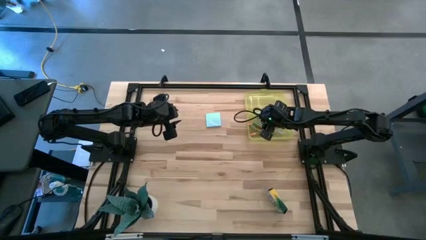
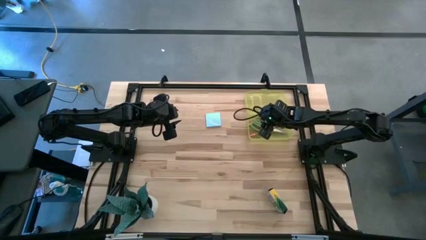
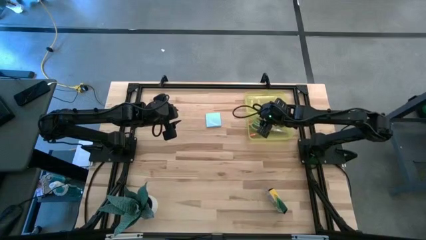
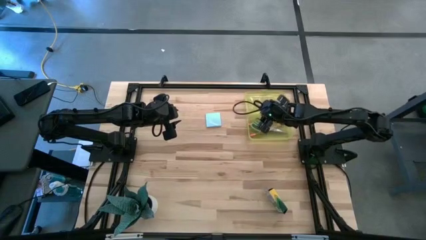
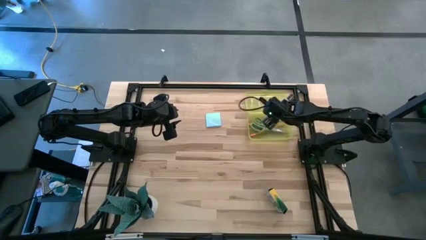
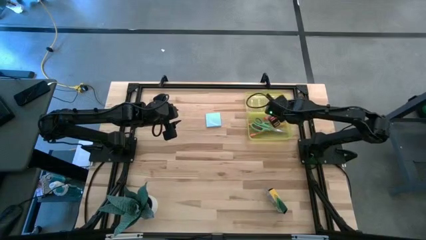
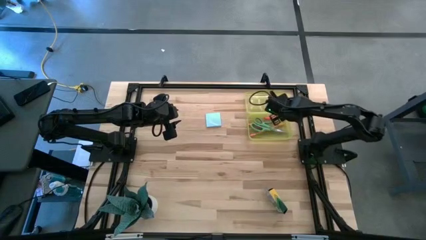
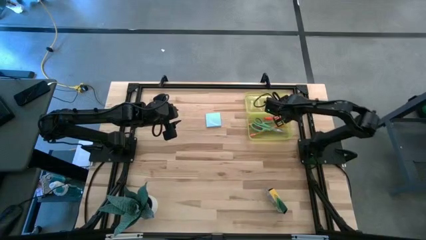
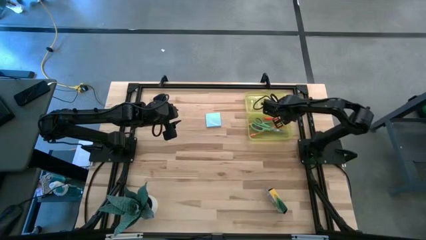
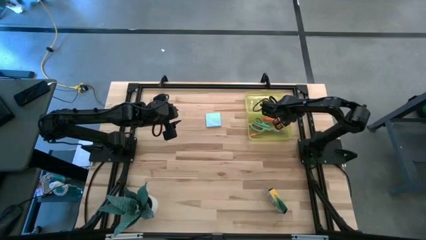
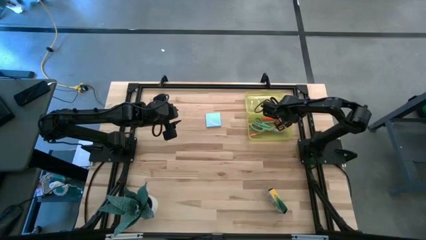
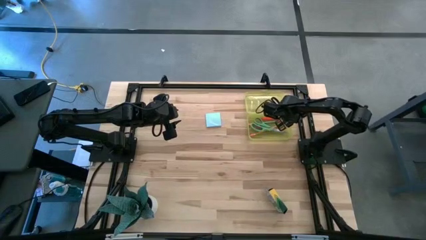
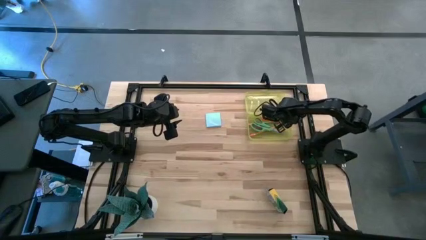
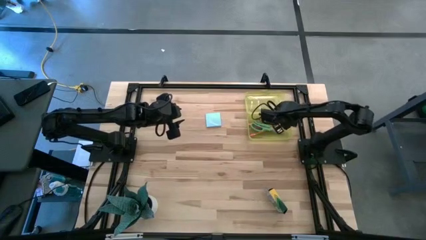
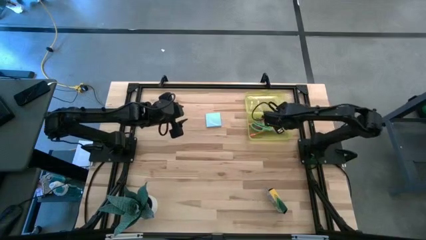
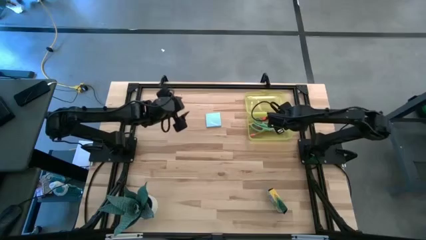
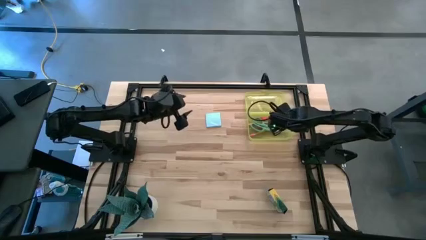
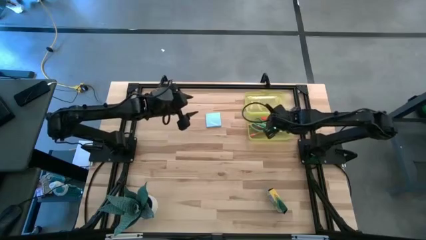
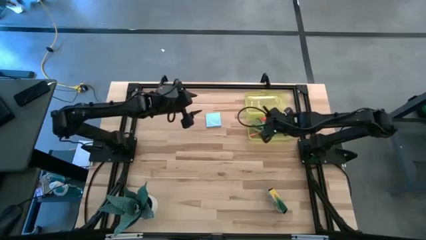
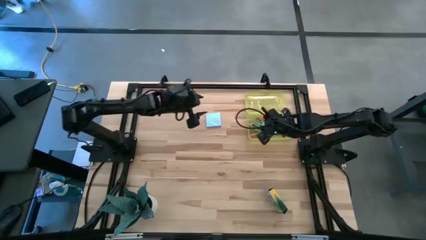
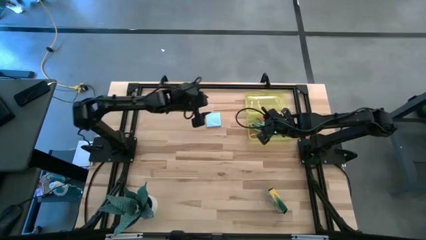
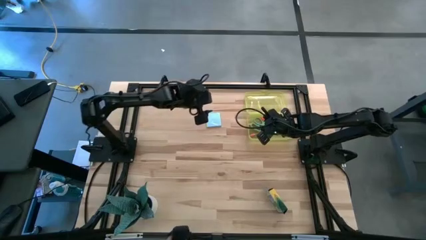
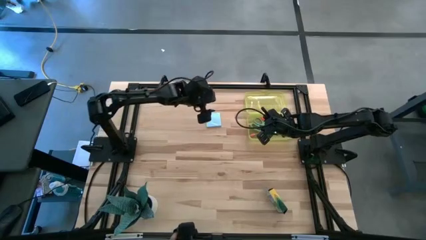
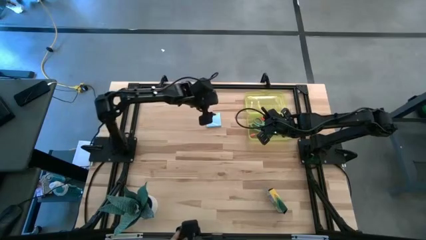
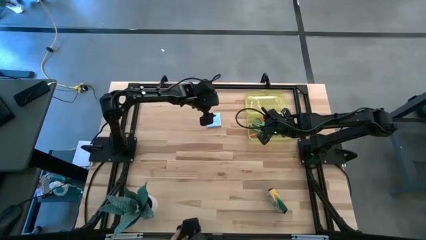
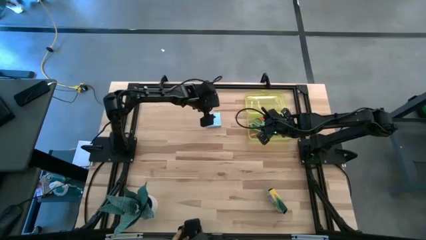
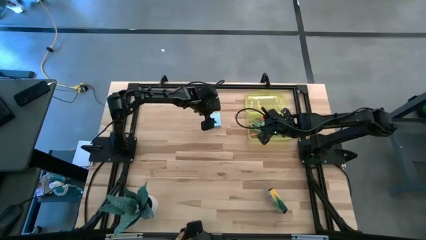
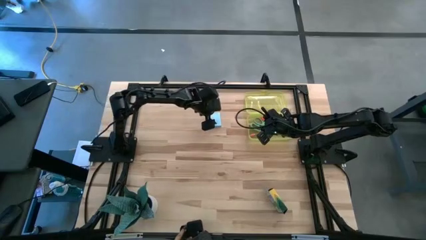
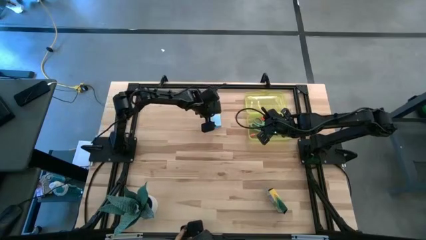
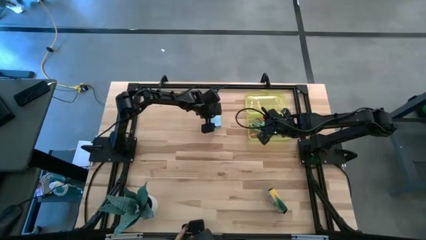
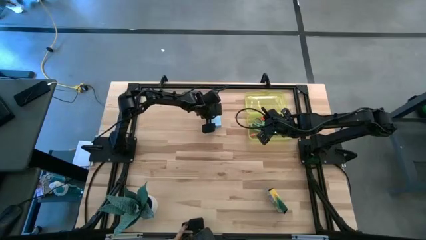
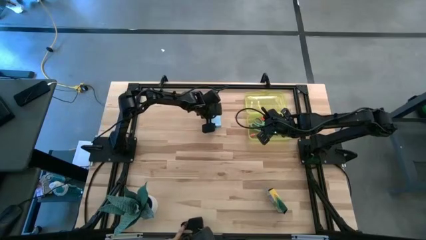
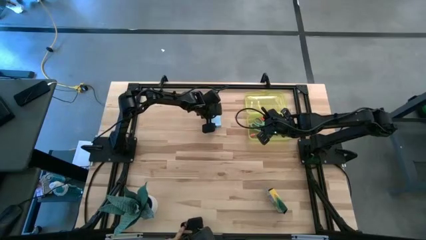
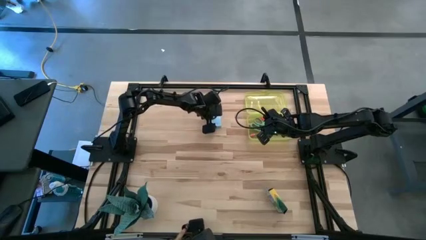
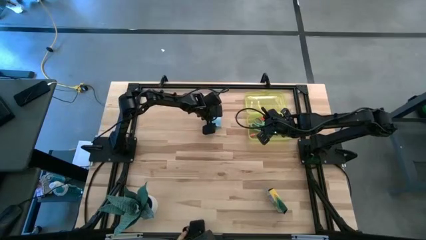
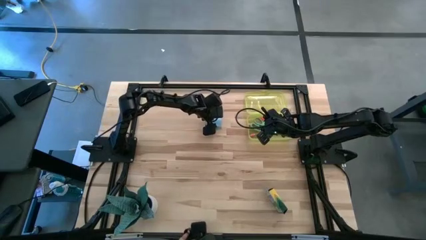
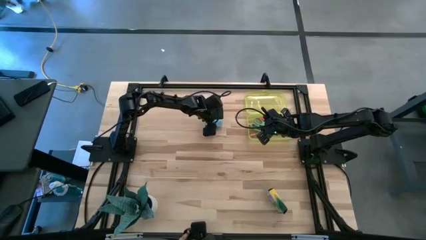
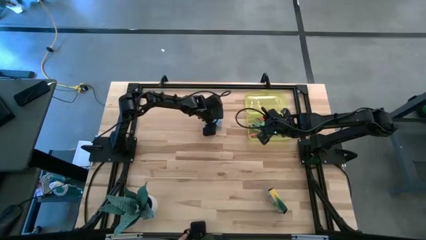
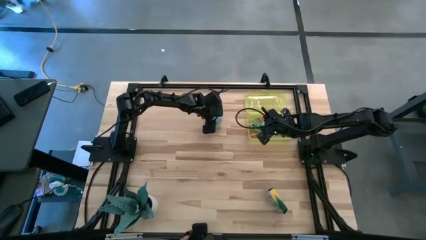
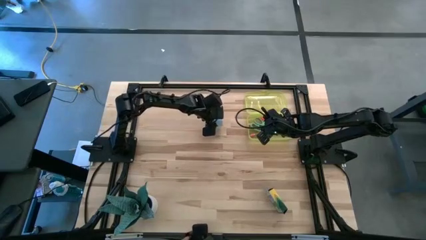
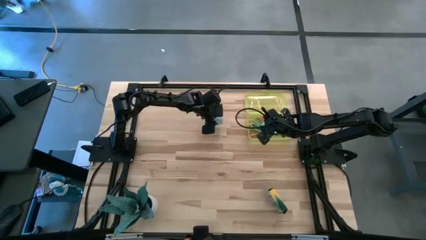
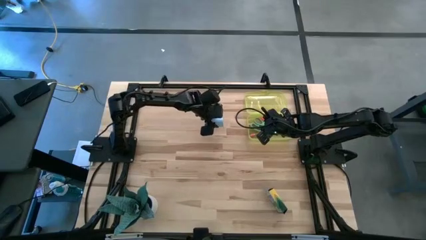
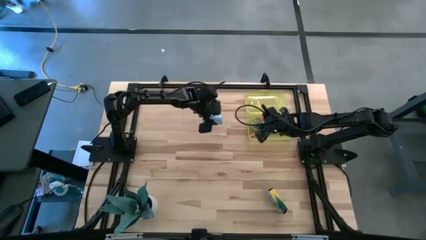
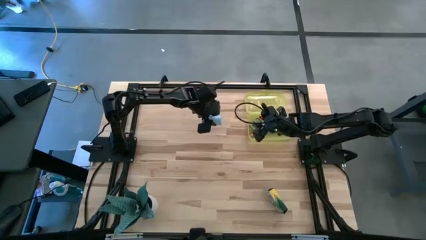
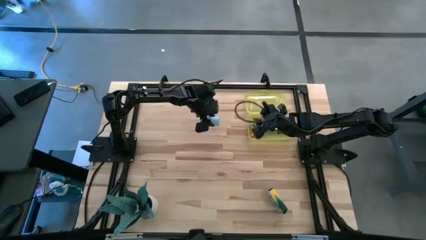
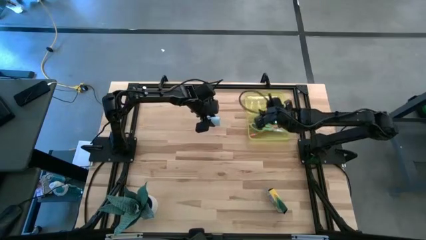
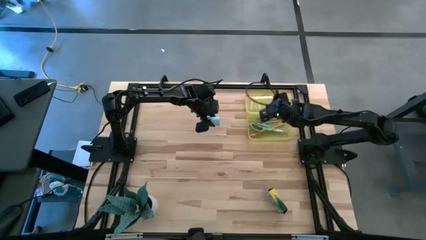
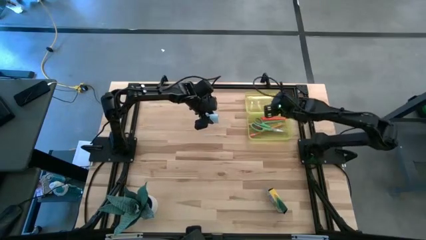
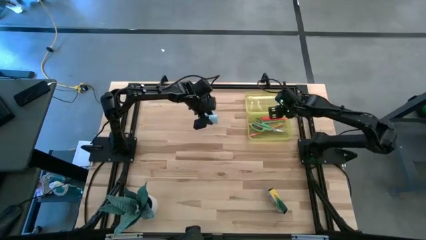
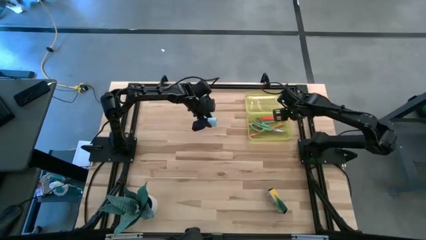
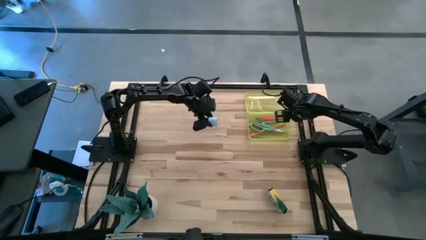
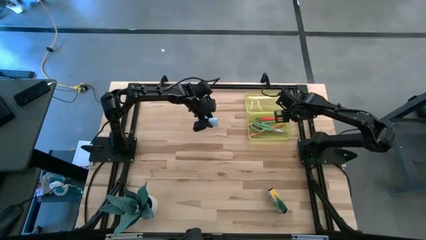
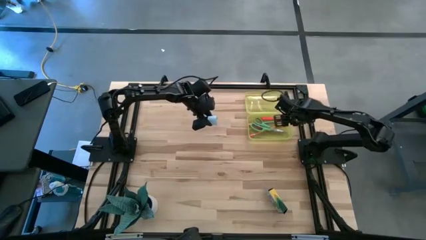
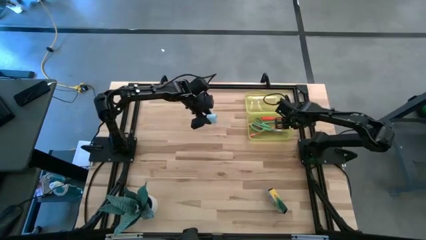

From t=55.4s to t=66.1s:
Task: Pack school essentials
Put the blue sticky notes into the yellow storage box

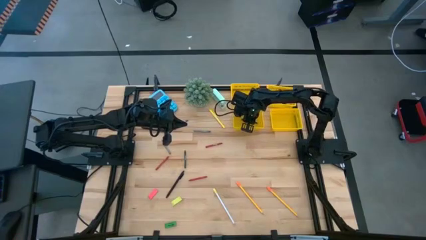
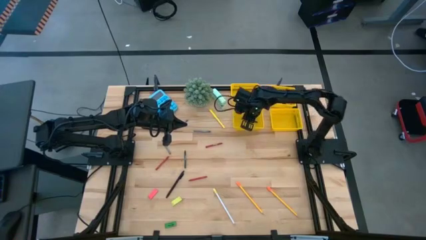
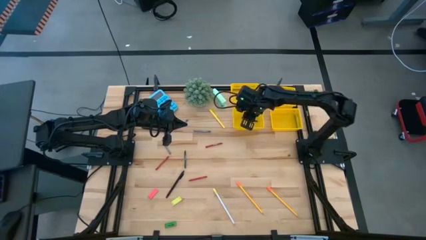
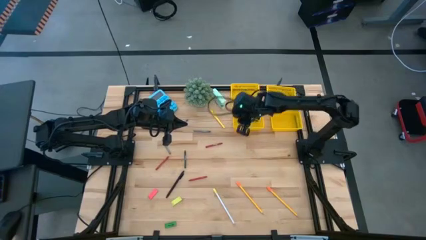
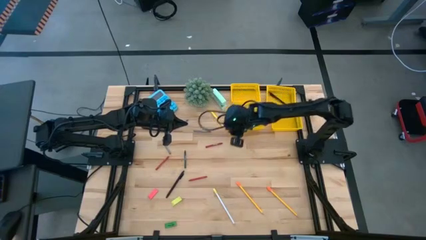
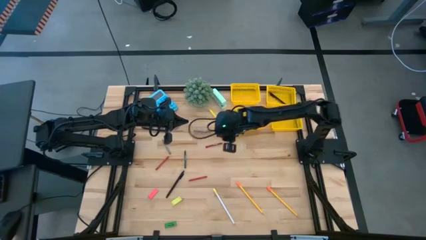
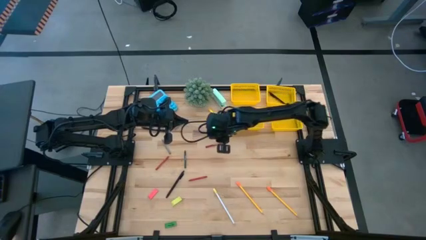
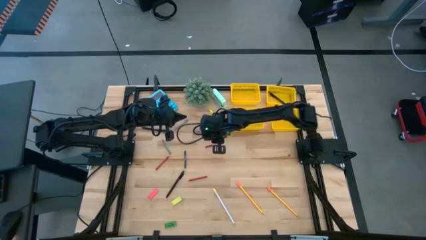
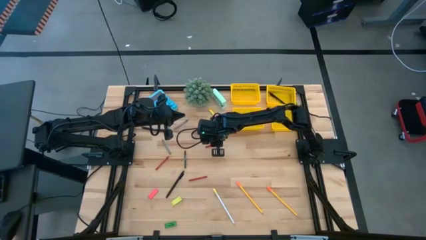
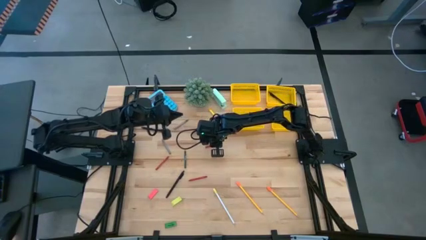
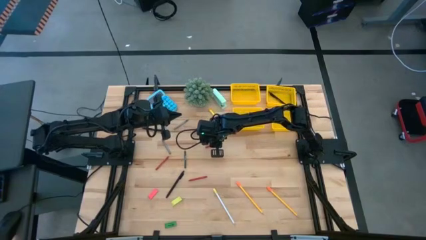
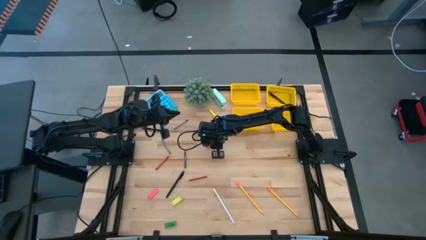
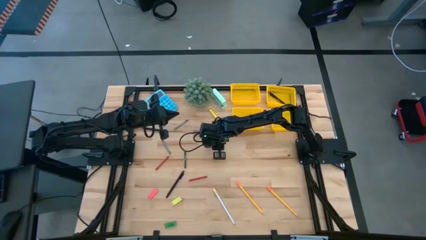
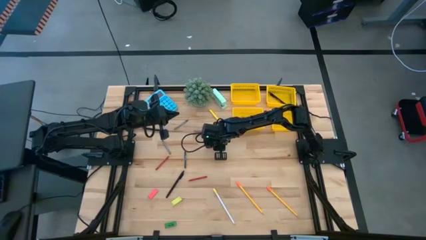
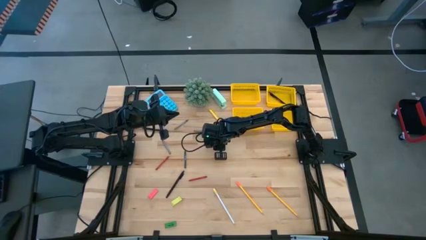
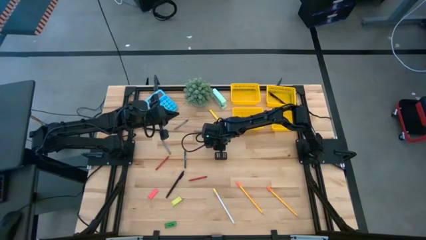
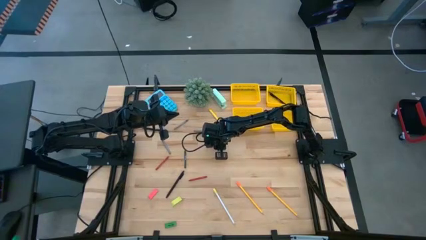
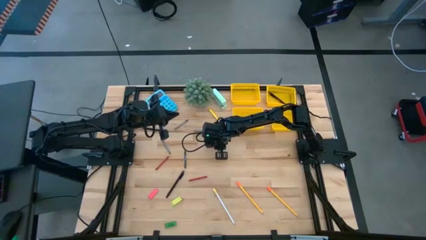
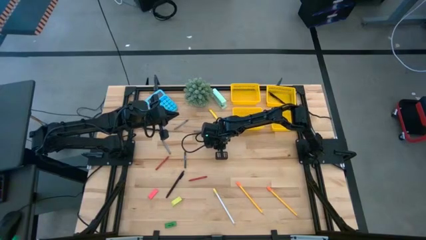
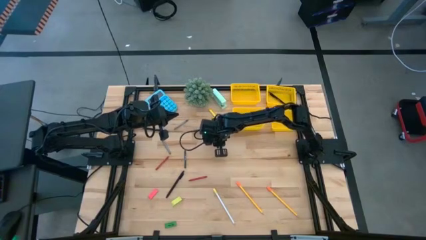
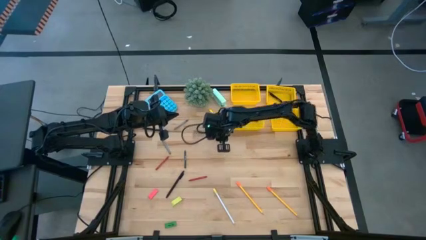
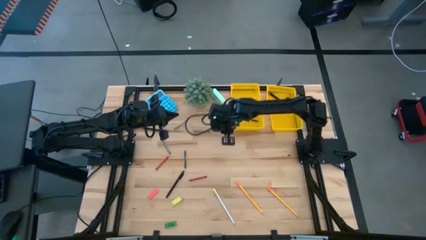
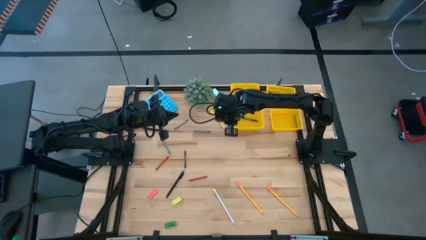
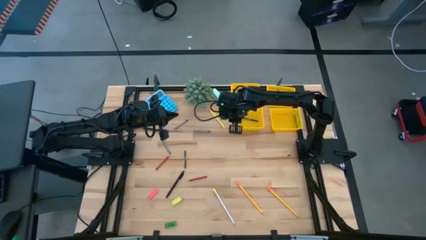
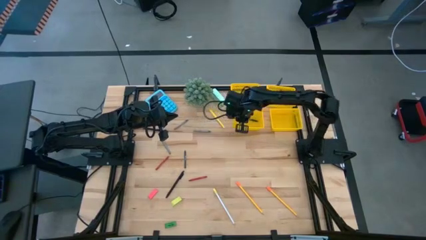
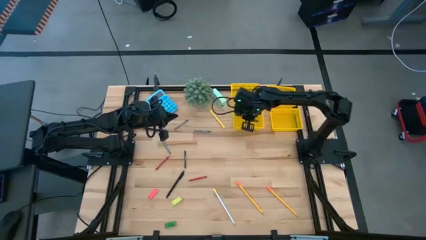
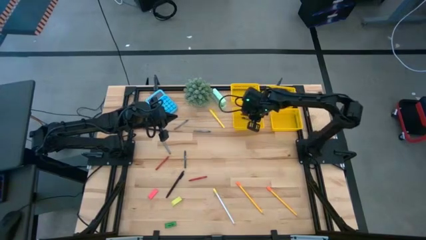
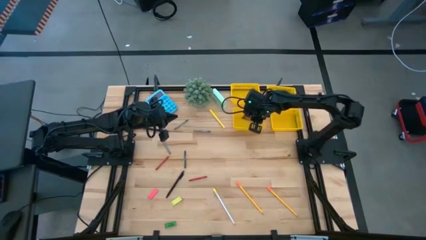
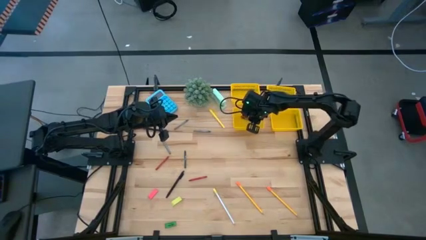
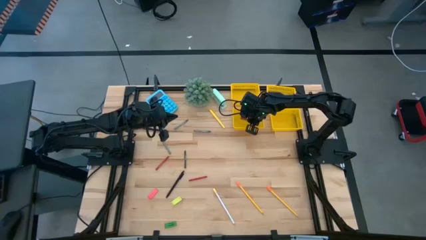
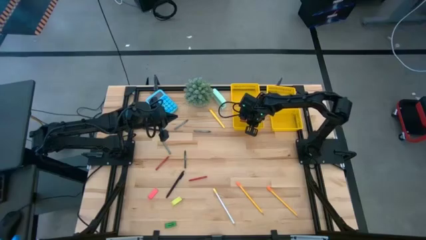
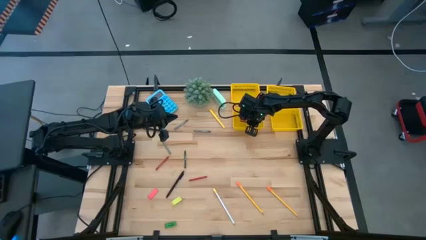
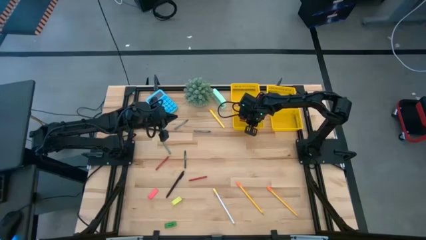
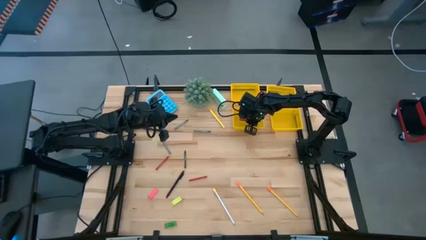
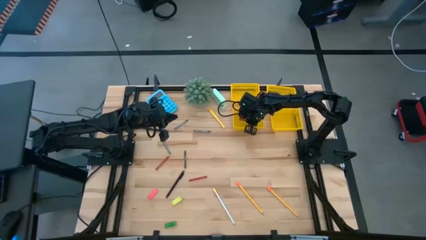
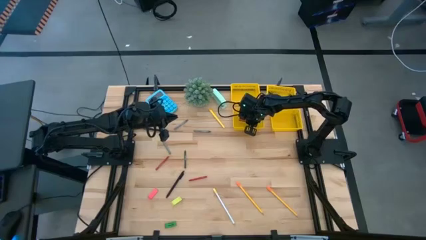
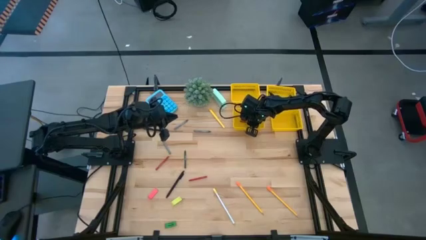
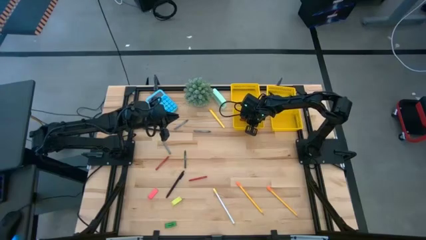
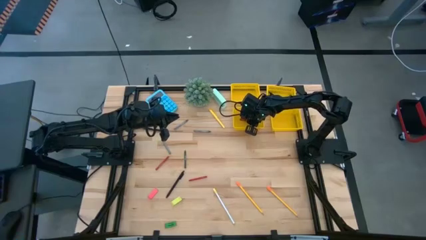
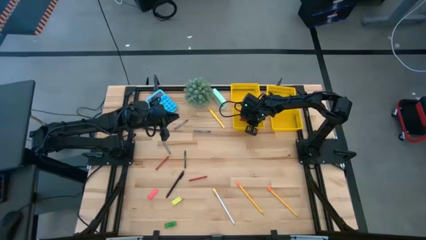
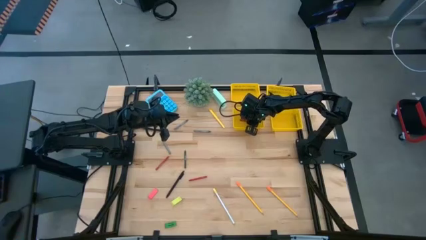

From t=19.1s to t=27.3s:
Task: Sort crayons/erasers/pens/pencils in bins
Put the top right red crayon into the bottom left yellow bin
